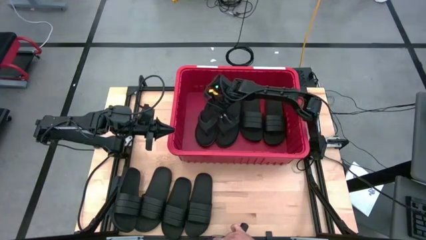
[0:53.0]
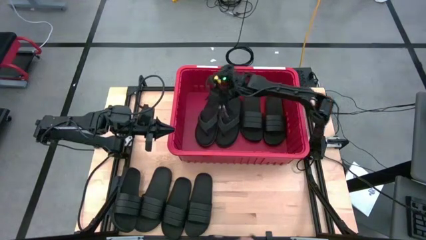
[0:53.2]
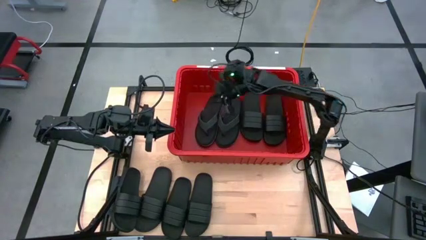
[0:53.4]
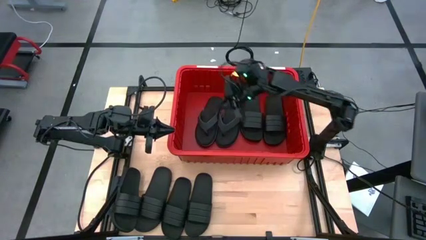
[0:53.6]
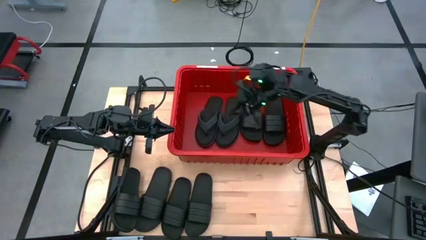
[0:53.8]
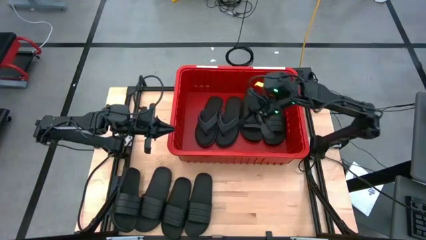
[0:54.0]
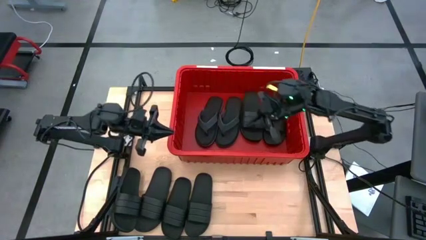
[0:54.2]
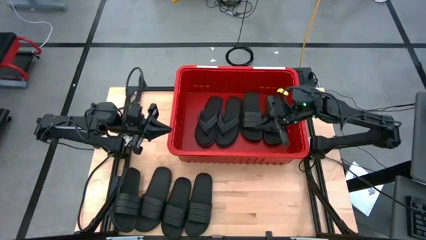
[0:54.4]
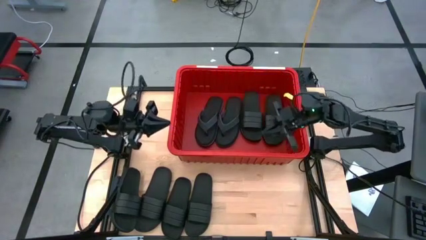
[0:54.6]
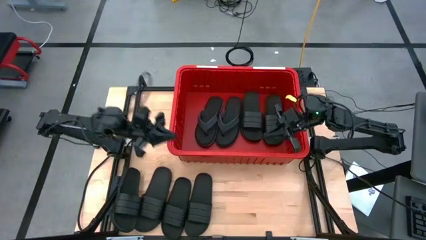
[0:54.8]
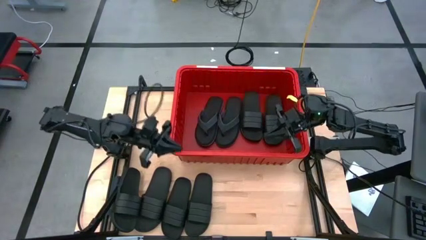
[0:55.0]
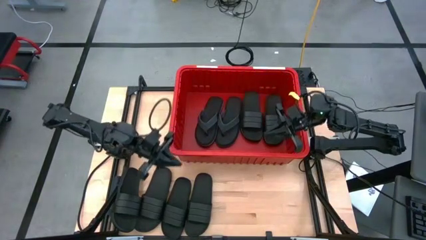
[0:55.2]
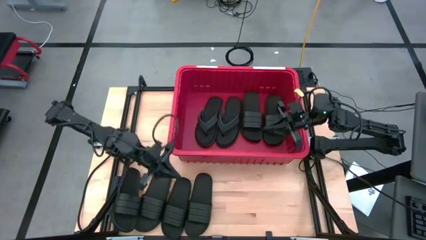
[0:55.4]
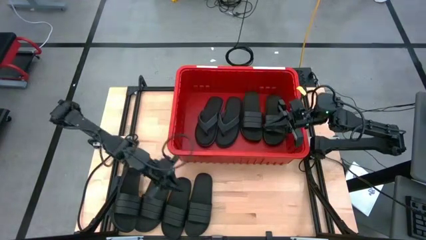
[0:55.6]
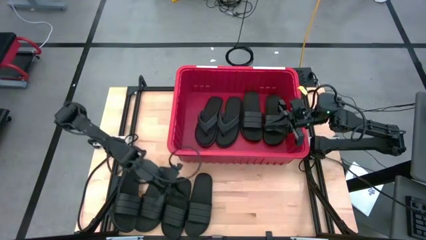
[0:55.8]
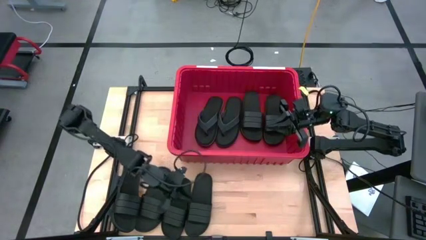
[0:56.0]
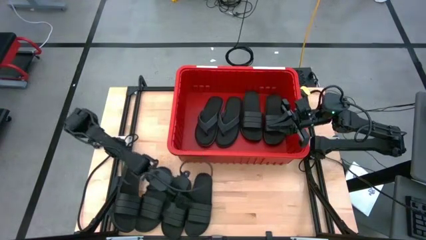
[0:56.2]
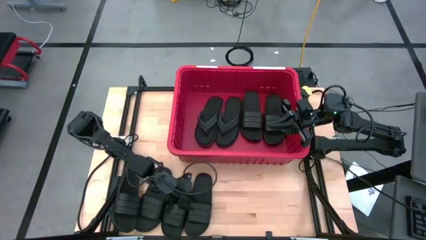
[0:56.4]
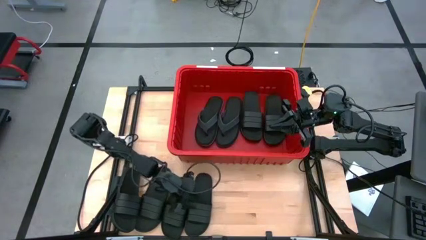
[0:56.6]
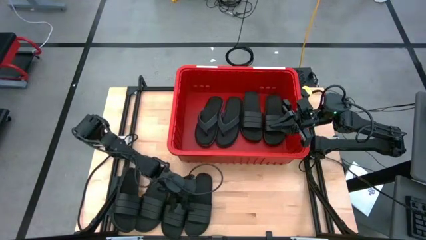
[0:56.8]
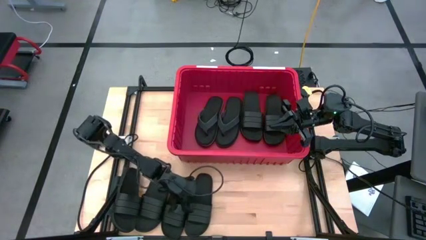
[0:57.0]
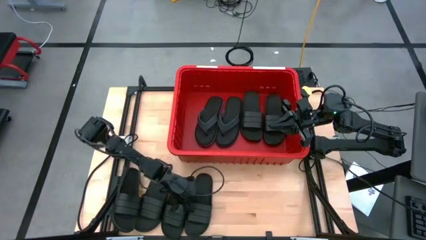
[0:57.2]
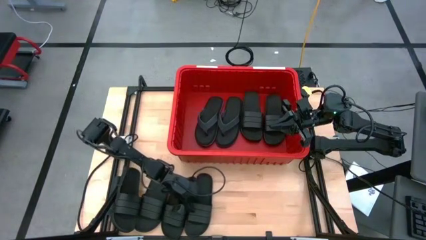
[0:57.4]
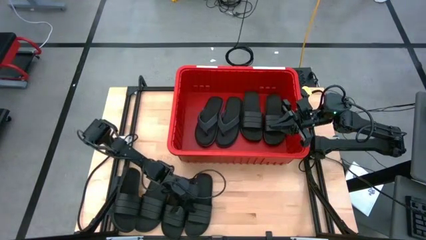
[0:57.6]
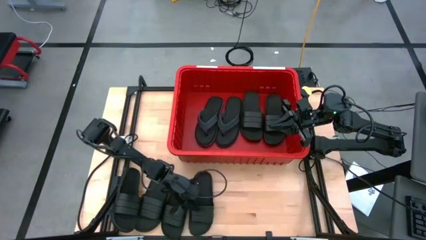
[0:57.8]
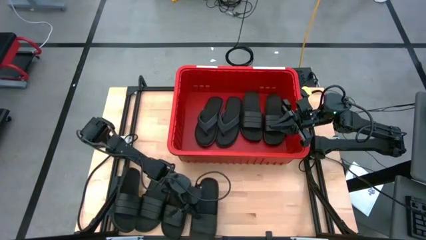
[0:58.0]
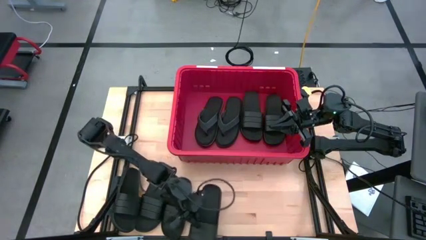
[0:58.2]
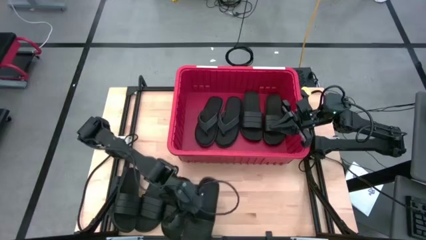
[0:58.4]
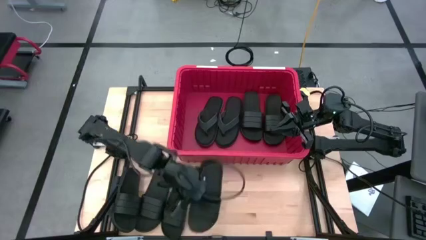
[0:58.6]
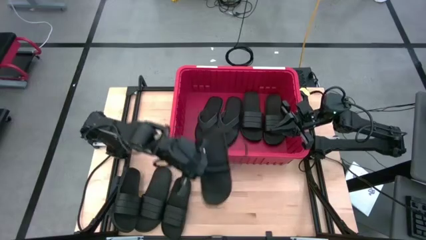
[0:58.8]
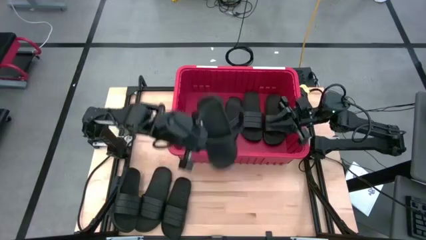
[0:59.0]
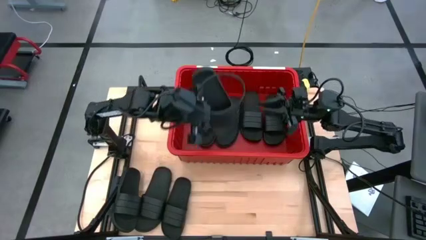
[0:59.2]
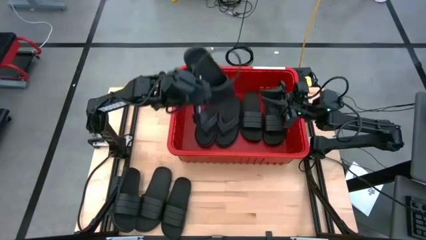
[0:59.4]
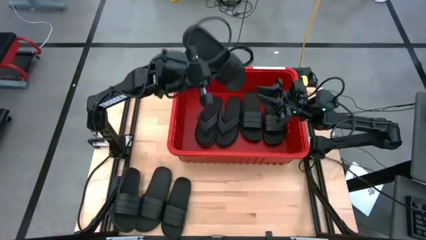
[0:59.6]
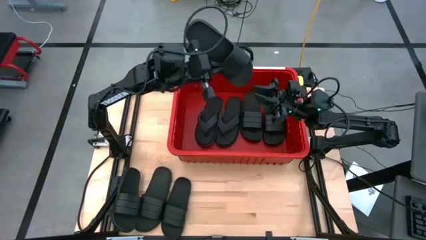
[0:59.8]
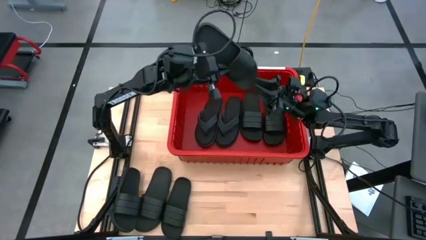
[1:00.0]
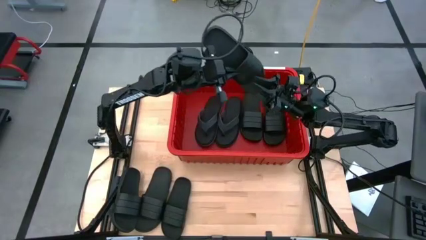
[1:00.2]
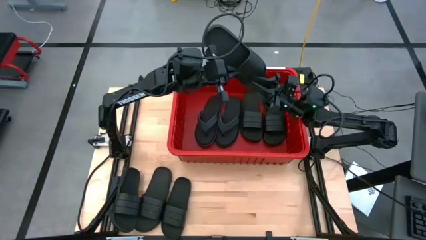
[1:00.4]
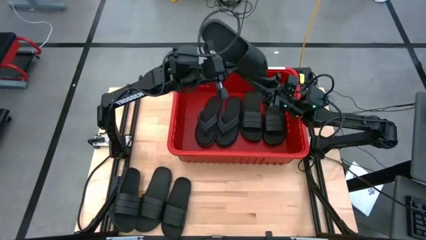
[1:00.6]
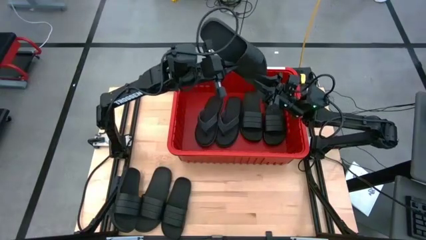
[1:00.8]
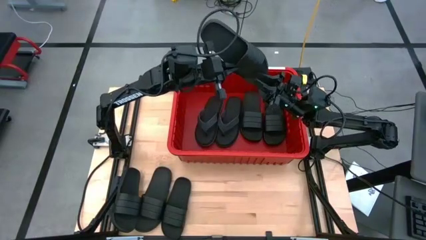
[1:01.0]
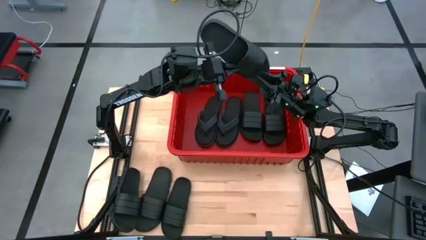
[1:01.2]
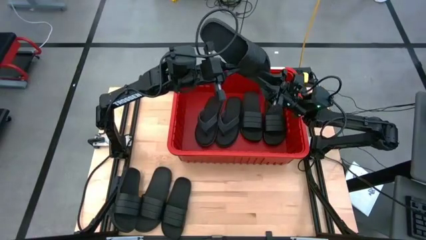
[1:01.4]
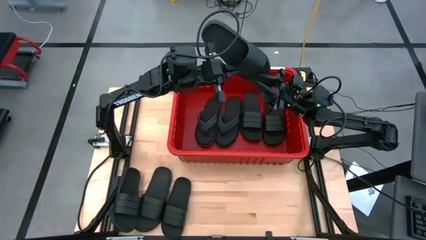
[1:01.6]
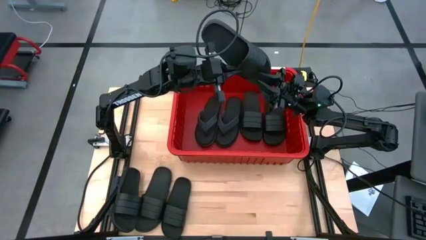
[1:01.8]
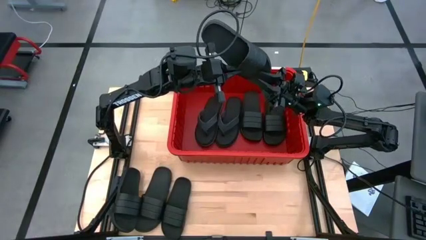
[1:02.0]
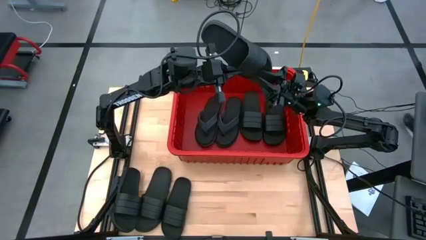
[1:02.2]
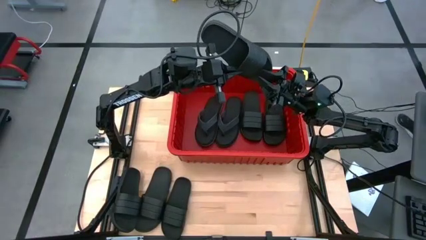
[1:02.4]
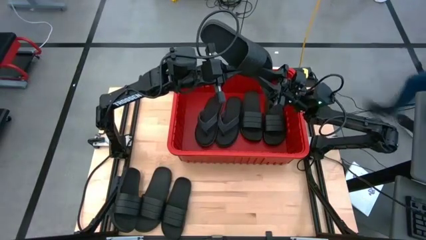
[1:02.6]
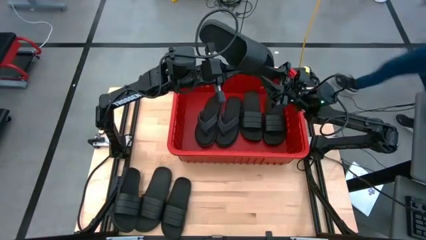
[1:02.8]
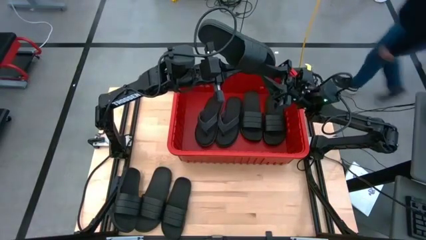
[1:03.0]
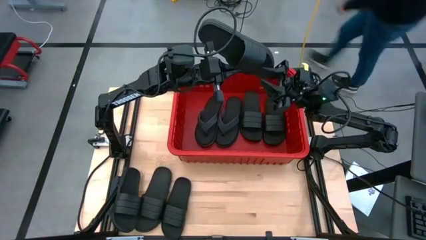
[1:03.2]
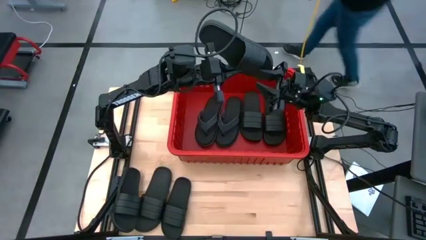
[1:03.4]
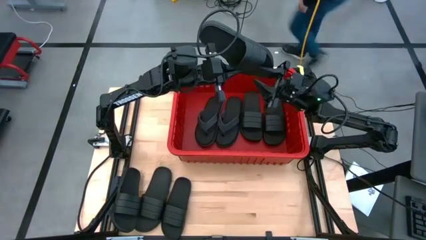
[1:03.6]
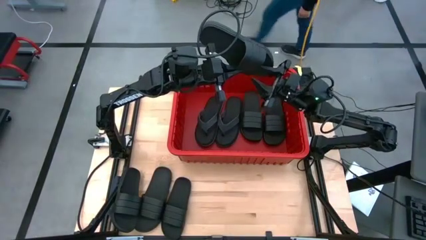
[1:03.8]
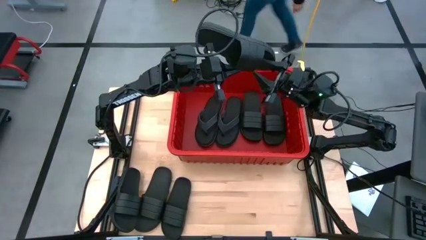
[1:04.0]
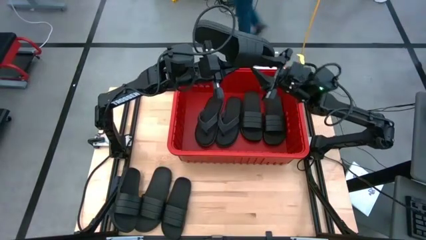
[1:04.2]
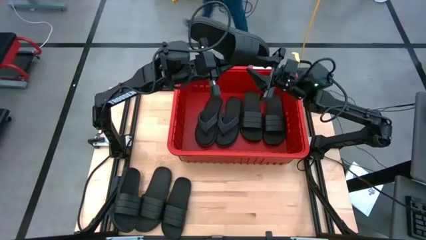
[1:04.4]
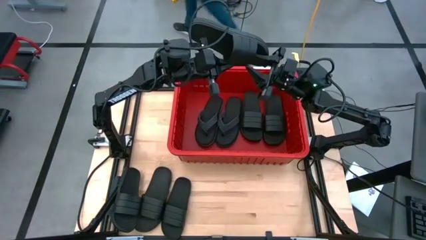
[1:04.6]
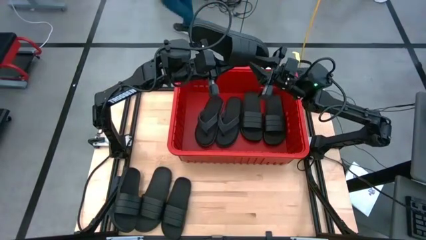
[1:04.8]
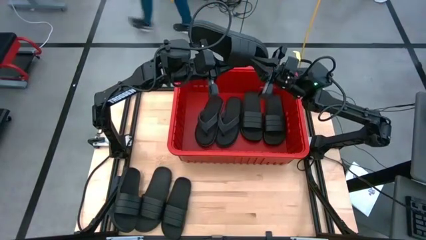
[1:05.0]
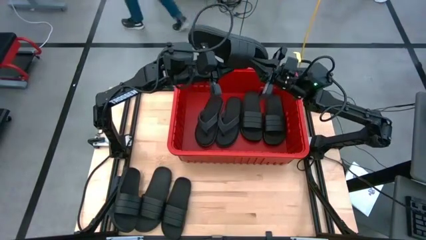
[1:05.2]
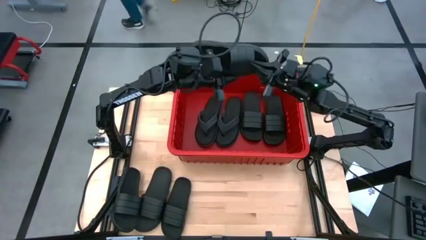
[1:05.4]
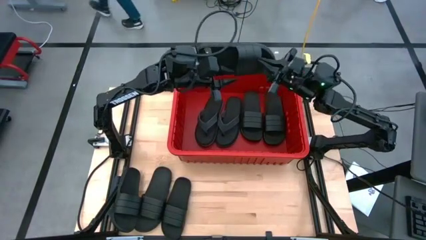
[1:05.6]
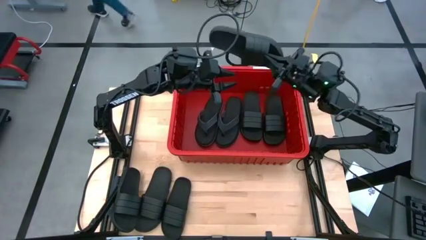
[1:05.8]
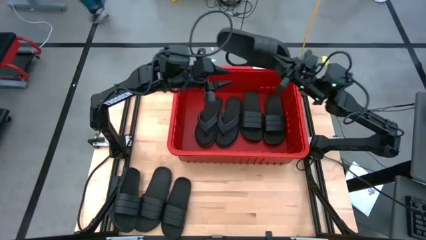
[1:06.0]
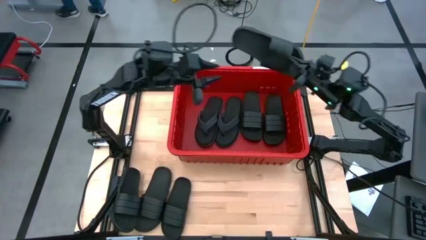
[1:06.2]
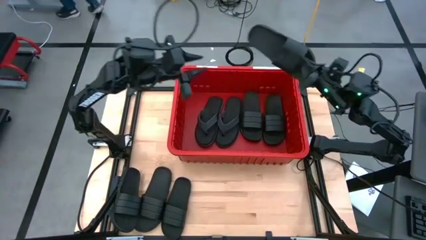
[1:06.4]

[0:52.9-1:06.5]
Task: Pick and place slides into bin
Put the black slide into the red container
